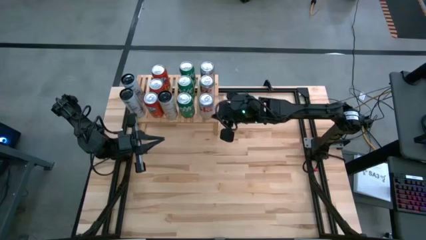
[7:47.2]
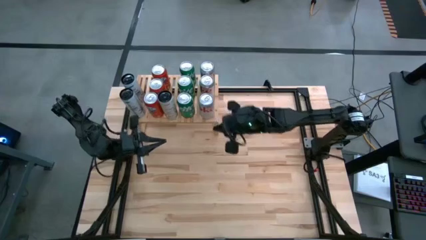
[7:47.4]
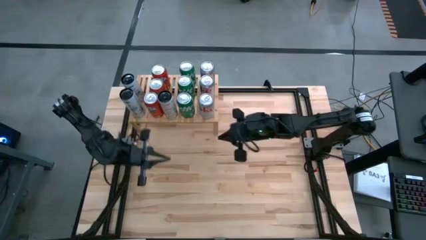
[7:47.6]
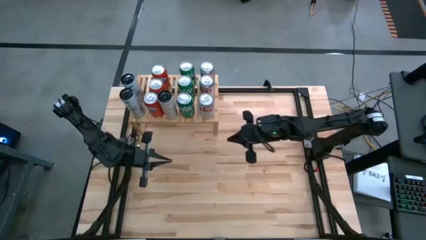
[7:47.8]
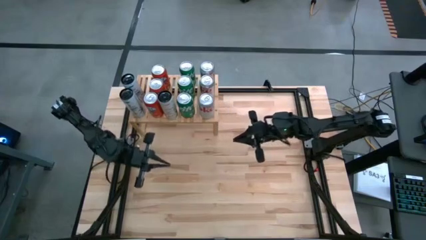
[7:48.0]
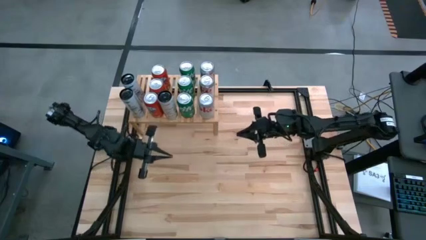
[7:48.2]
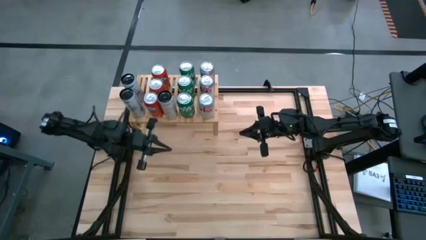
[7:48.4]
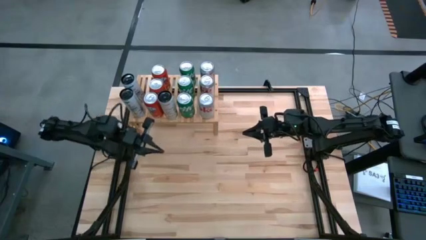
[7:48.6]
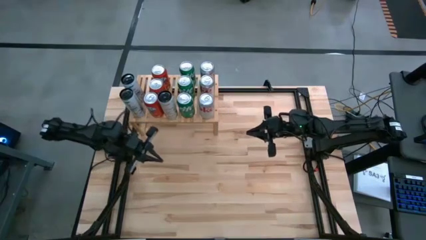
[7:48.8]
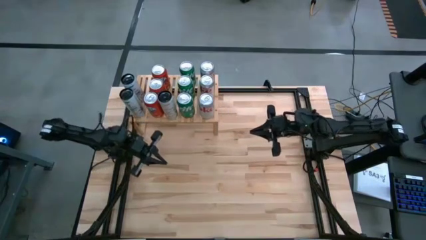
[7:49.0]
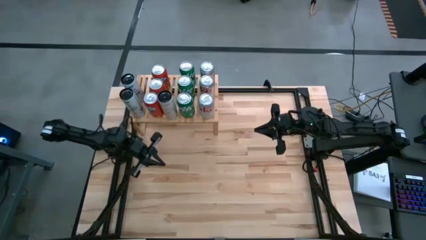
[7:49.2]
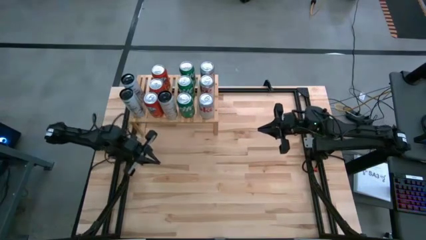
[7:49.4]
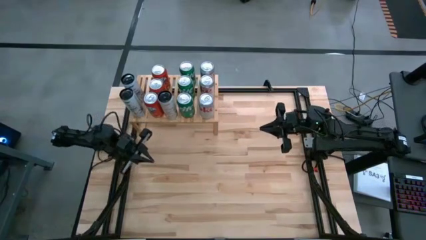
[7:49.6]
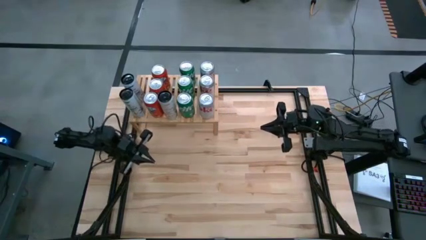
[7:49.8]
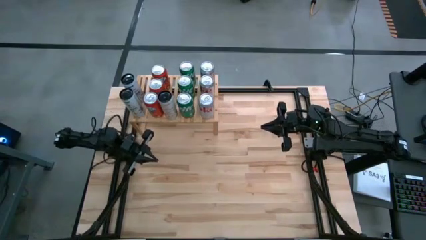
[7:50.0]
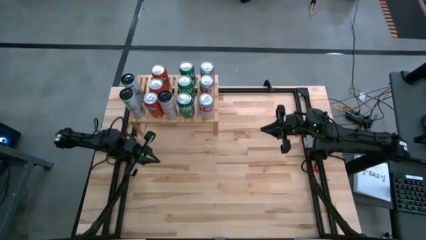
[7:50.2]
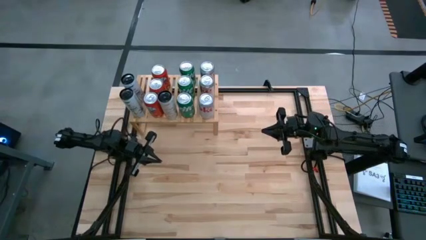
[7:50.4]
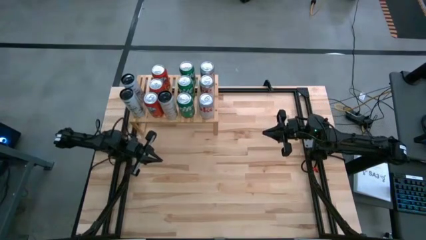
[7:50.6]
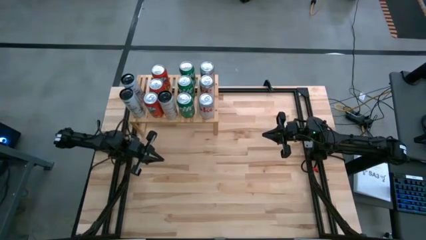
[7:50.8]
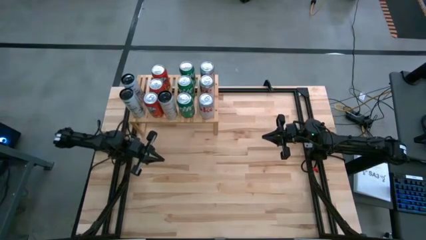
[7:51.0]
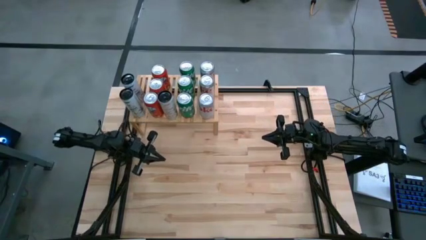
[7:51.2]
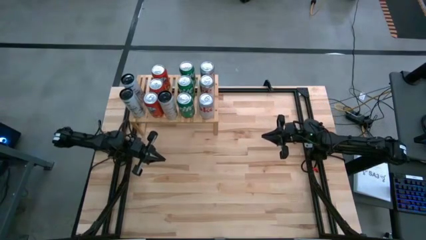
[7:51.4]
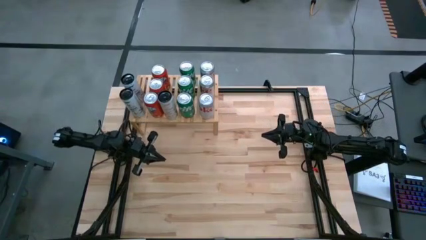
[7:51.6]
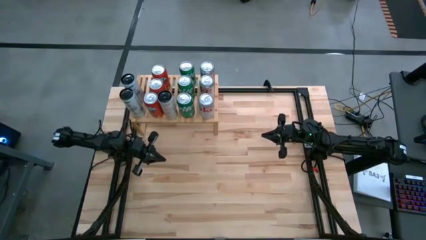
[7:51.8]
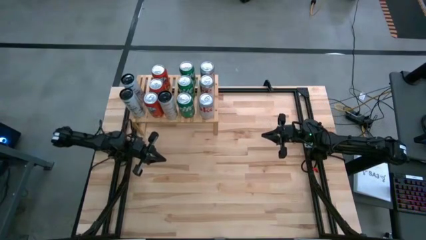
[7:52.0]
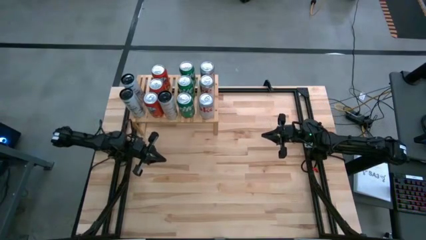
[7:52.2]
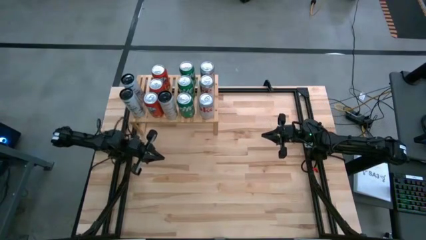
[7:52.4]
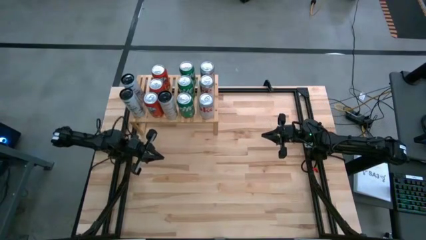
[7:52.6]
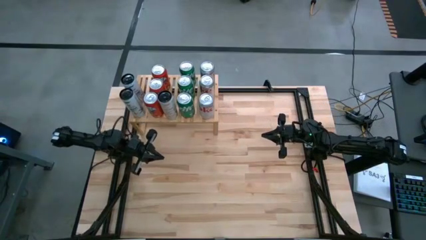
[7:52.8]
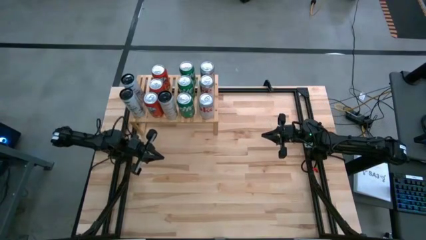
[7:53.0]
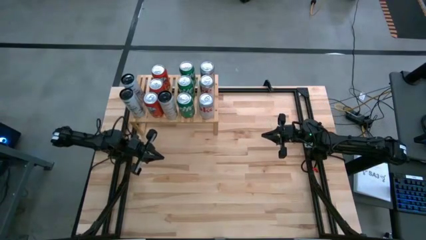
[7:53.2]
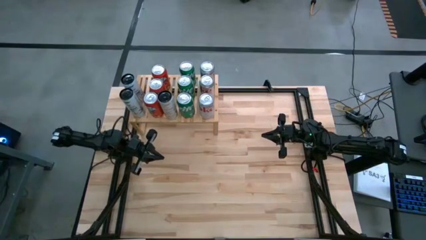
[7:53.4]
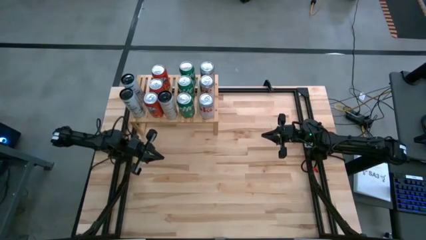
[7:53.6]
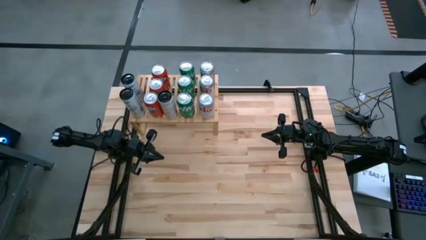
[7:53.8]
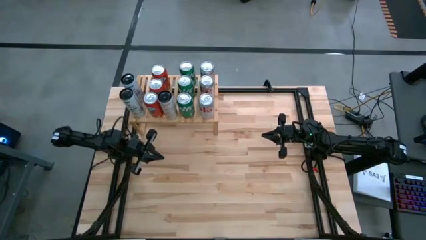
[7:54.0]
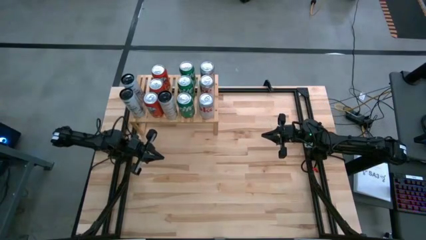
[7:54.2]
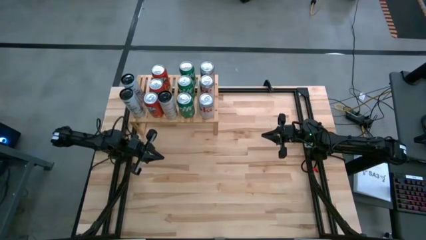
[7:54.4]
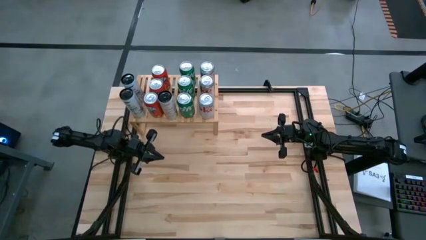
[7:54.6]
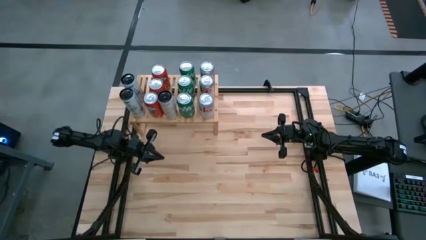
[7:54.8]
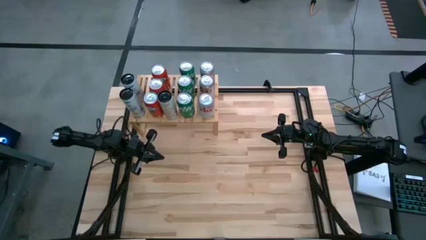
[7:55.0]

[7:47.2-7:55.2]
Task: Place canned beverage on shelf
Return to Home Position

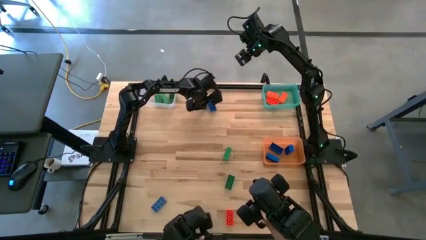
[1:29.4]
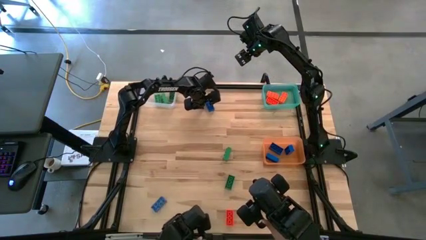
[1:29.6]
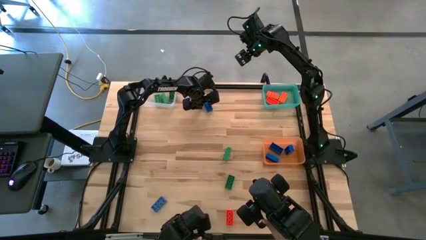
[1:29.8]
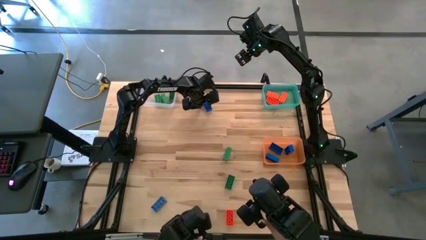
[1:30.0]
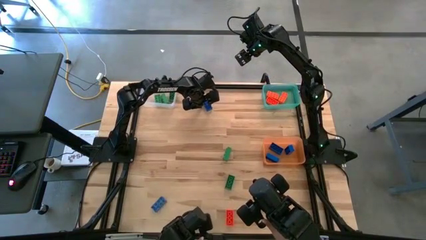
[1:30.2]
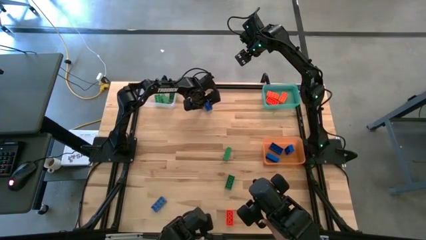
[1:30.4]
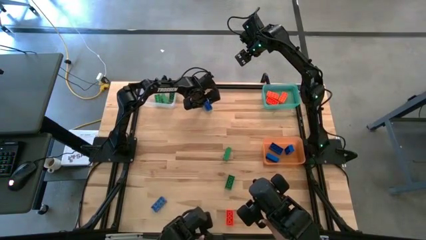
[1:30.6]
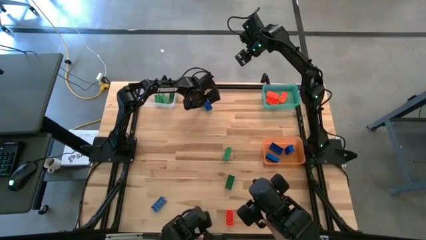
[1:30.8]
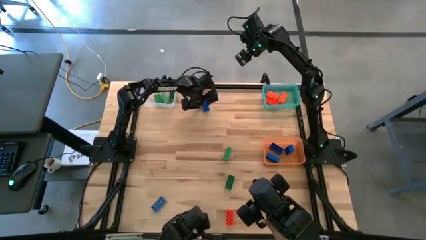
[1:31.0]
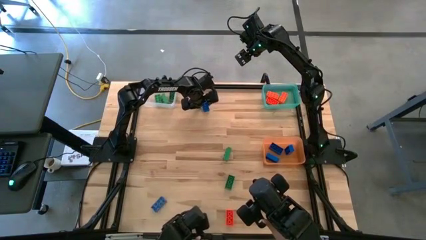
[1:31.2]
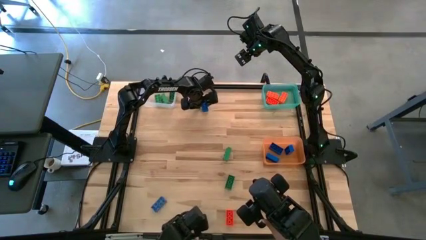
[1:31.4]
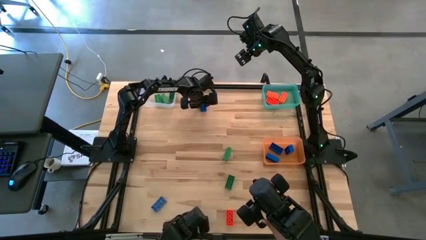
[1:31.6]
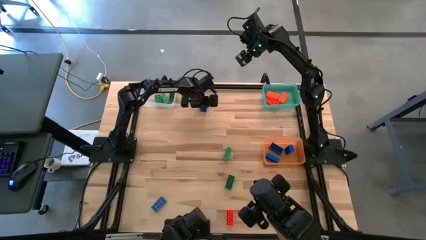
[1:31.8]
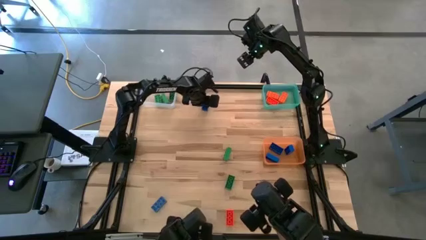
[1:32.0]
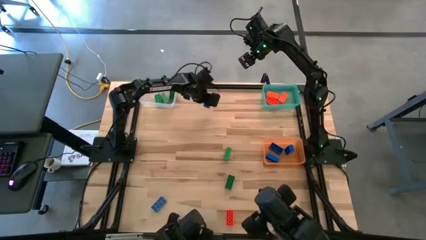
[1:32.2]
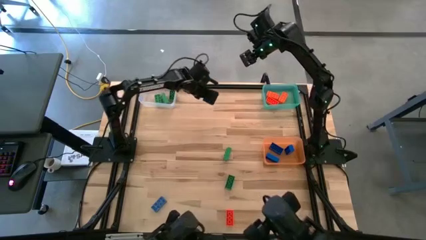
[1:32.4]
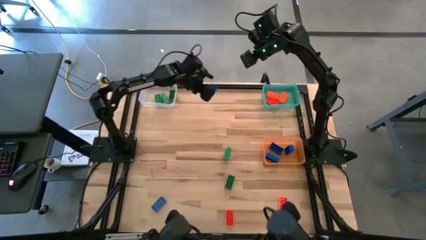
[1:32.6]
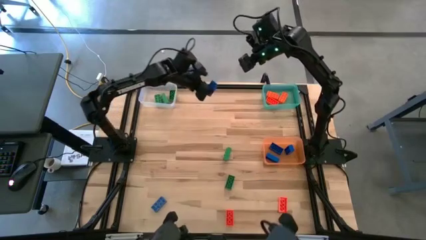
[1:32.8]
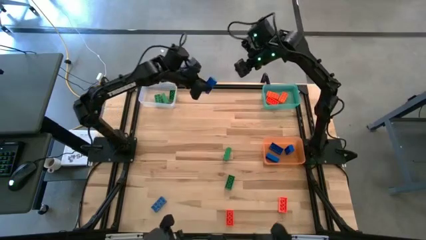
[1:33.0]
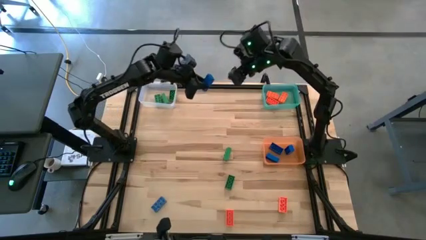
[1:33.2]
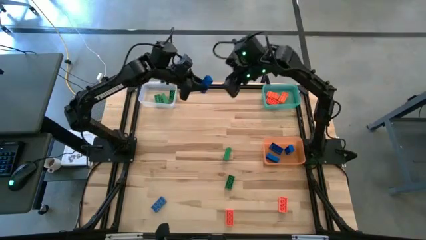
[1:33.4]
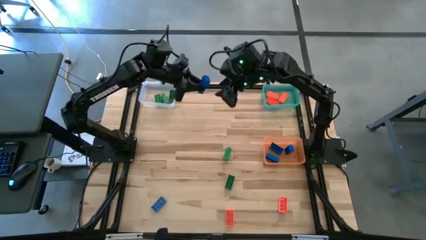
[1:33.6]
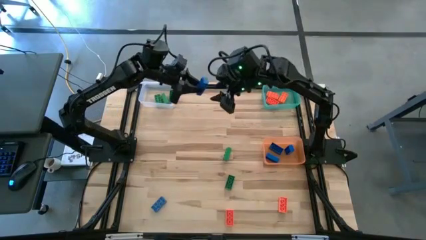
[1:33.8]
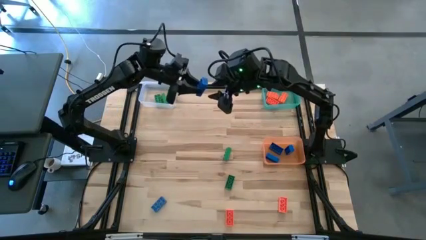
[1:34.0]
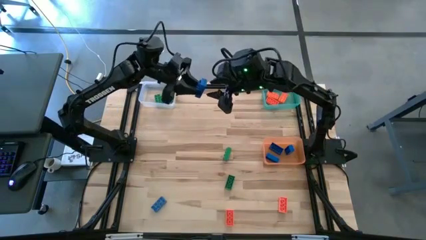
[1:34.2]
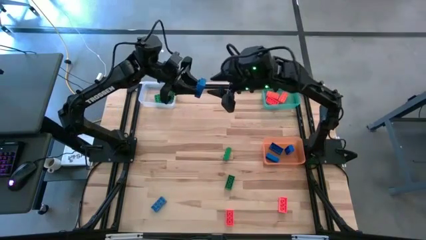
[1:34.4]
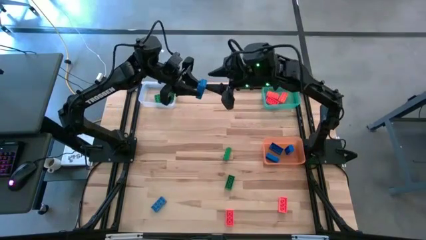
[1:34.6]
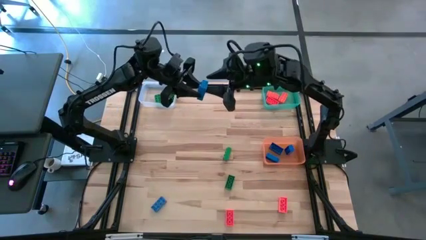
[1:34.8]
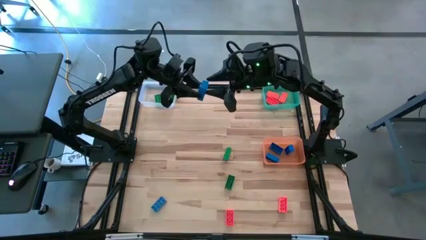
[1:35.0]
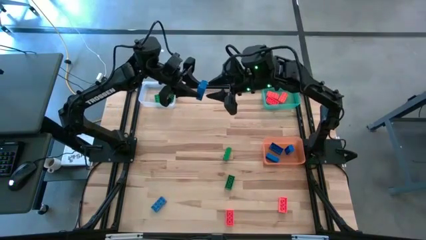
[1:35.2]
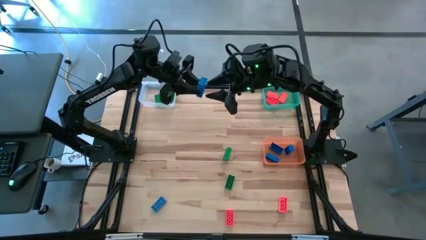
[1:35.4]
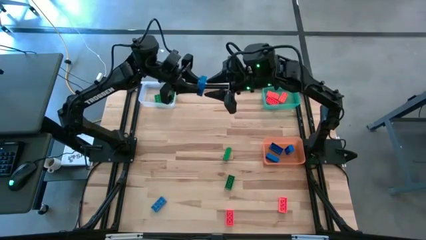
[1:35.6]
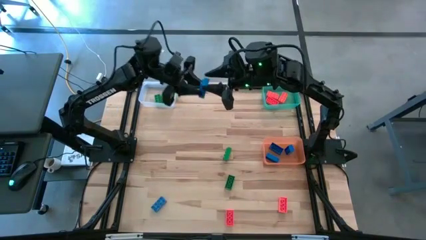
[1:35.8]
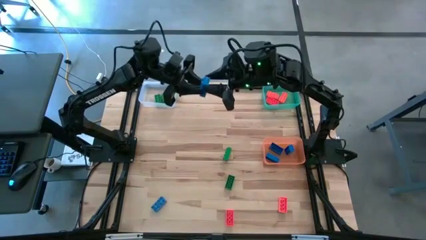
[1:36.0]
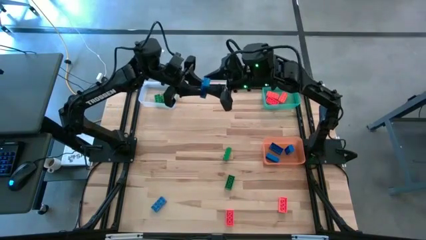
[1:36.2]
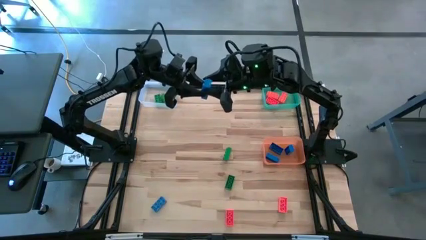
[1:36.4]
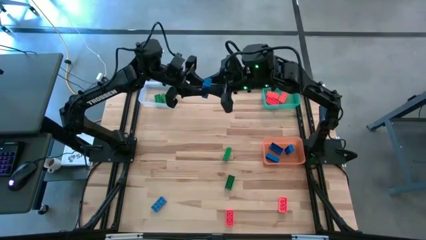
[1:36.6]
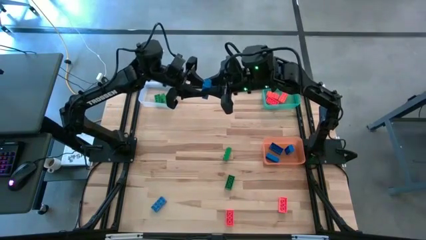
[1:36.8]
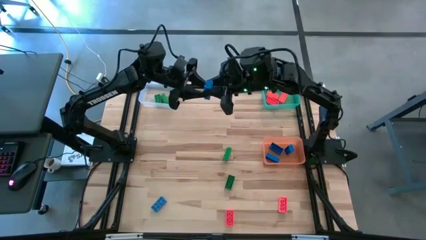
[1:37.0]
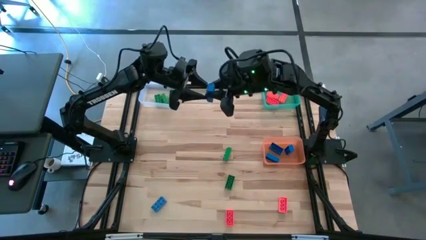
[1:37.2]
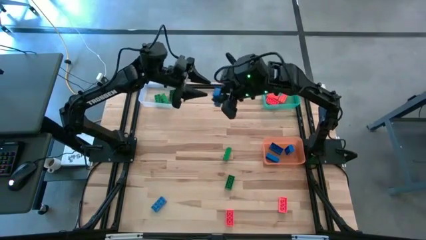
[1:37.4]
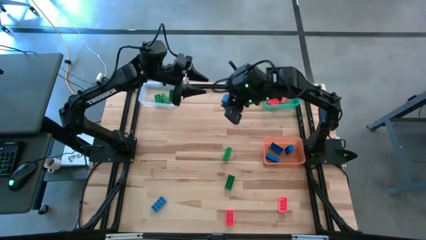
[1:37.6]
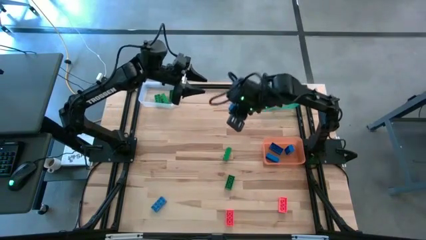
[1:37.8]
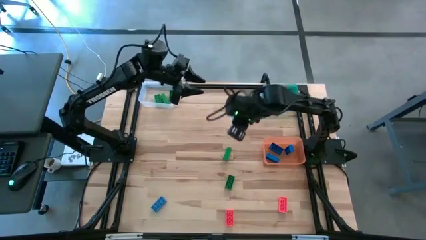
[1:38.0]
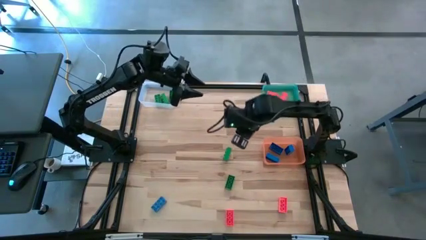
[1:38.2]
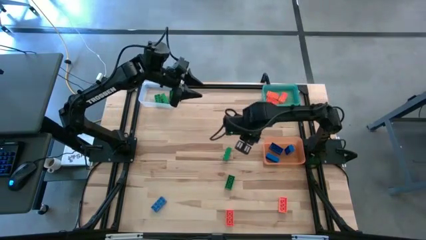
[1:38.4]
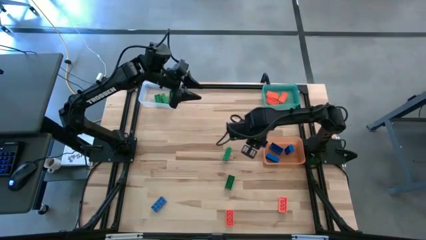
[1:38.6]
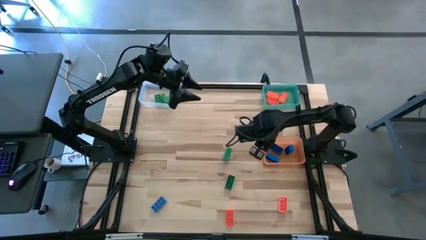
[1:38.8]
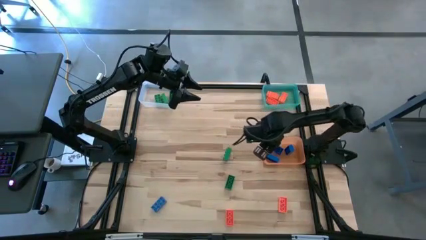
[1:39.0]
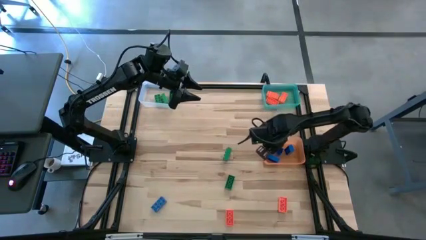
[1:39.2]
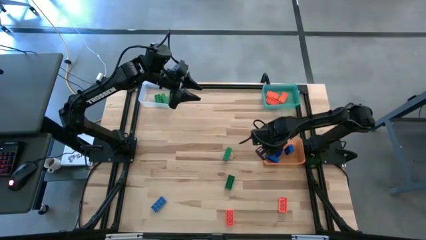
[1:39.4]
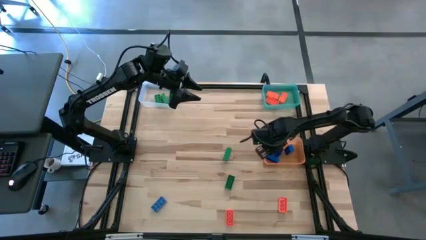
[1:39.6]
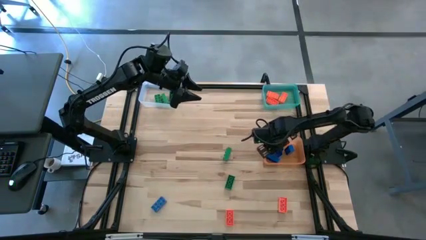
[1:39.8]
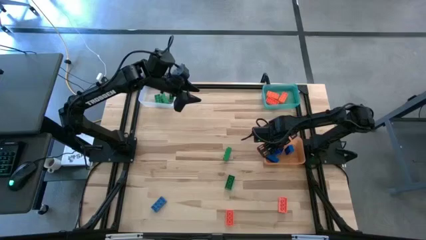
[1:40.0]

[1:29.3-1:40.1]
Task: Sort & place blocks by color
Put the blue game piece into the orange bin
